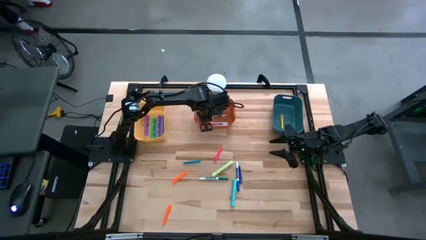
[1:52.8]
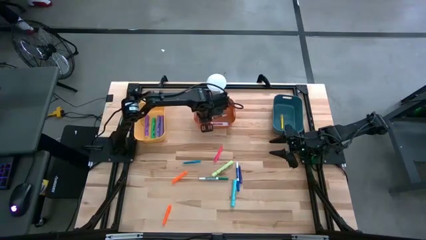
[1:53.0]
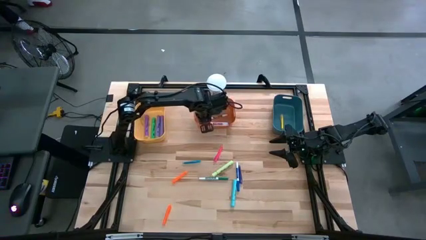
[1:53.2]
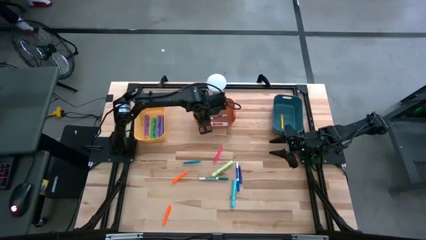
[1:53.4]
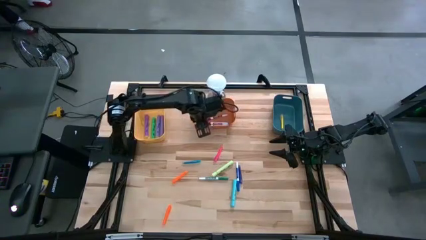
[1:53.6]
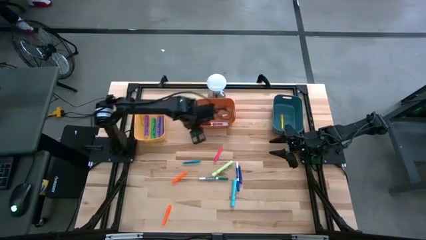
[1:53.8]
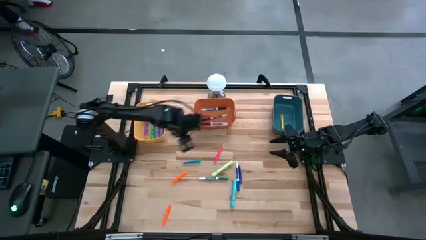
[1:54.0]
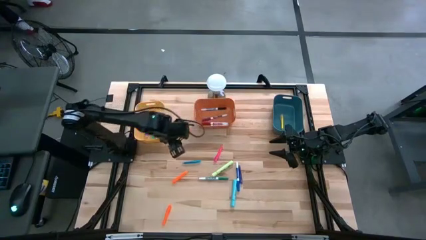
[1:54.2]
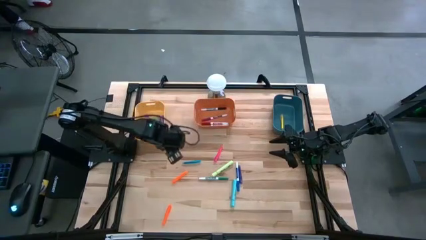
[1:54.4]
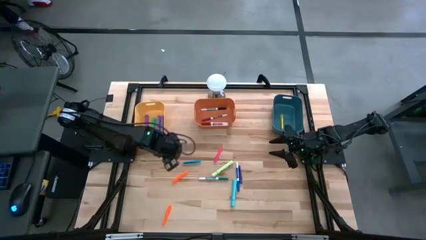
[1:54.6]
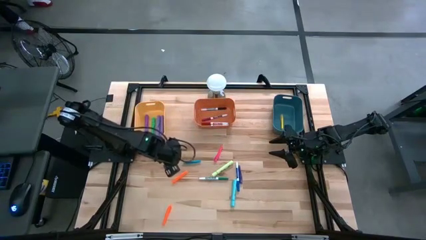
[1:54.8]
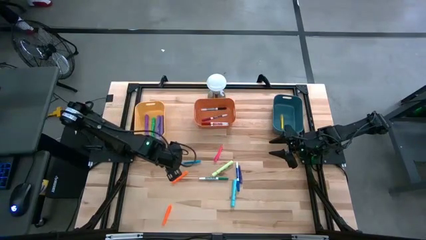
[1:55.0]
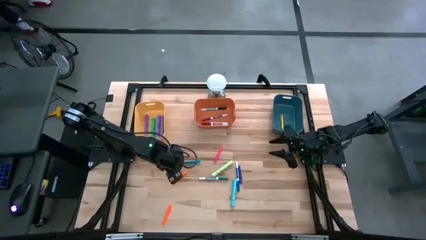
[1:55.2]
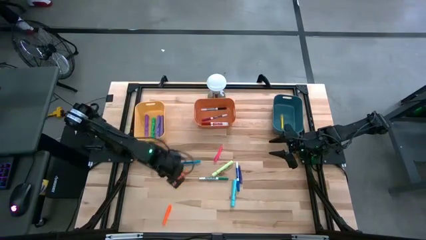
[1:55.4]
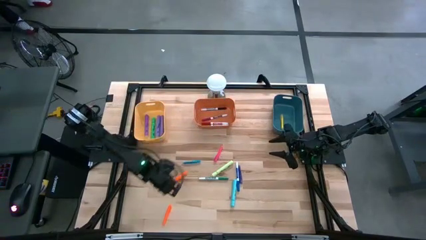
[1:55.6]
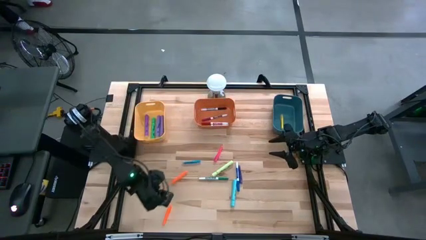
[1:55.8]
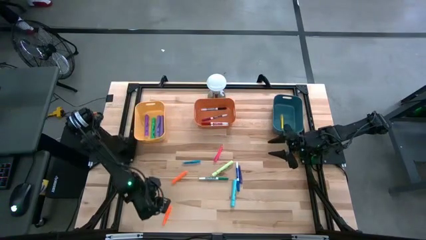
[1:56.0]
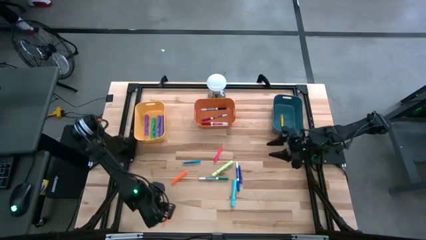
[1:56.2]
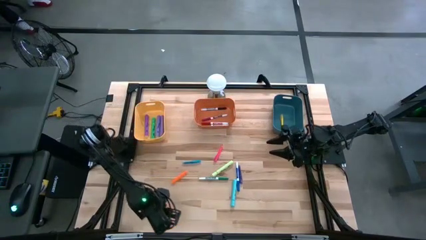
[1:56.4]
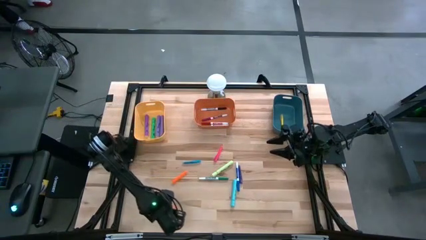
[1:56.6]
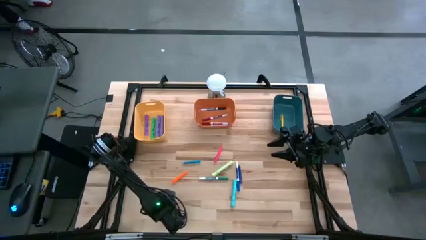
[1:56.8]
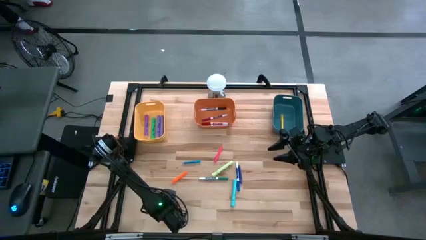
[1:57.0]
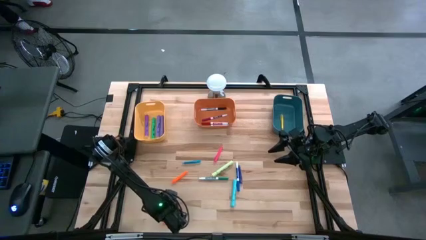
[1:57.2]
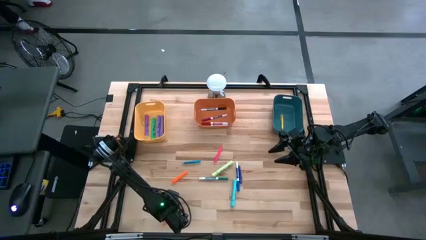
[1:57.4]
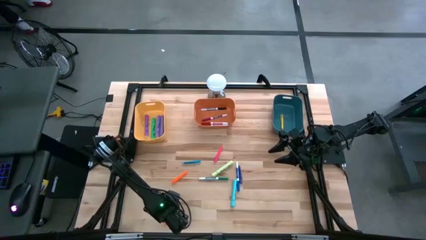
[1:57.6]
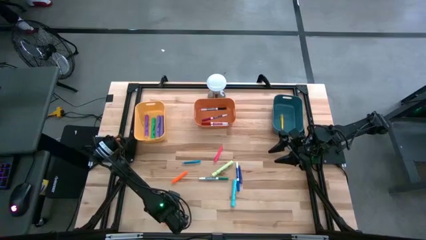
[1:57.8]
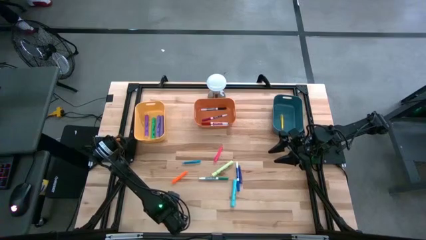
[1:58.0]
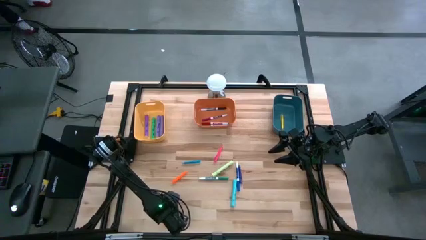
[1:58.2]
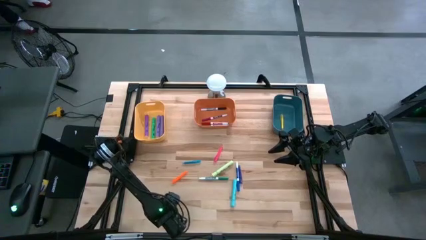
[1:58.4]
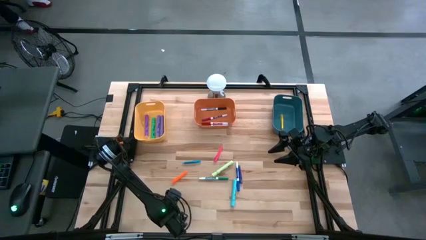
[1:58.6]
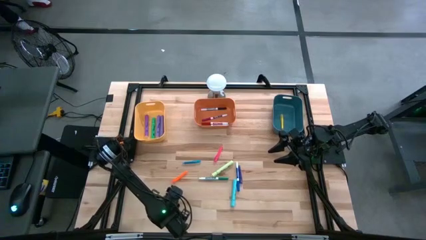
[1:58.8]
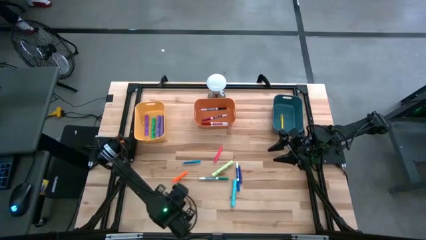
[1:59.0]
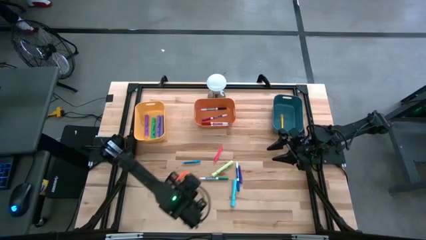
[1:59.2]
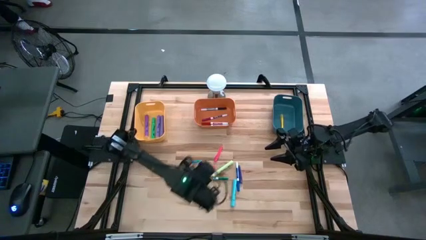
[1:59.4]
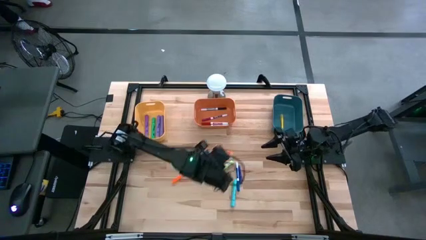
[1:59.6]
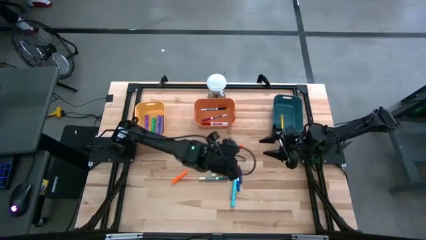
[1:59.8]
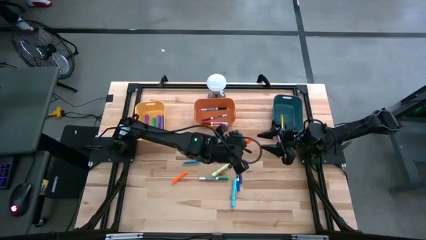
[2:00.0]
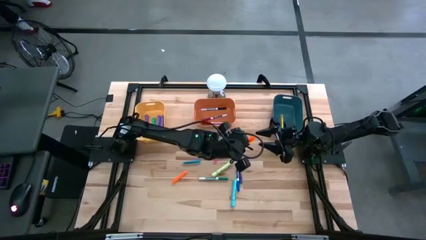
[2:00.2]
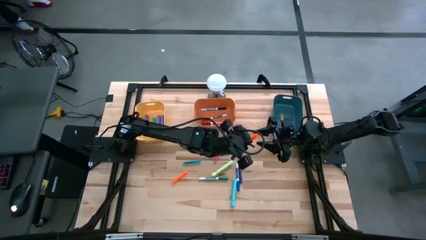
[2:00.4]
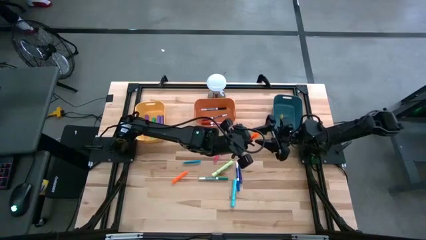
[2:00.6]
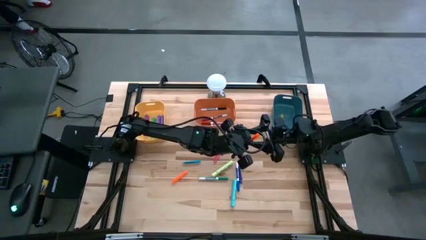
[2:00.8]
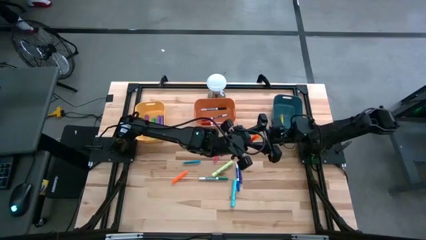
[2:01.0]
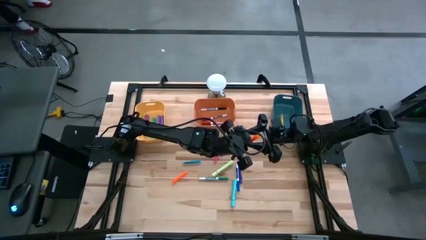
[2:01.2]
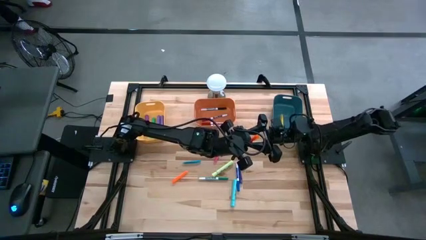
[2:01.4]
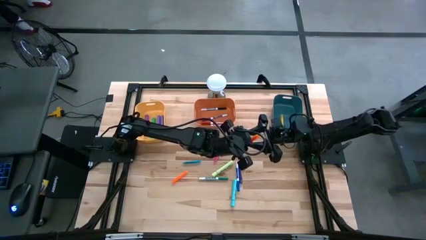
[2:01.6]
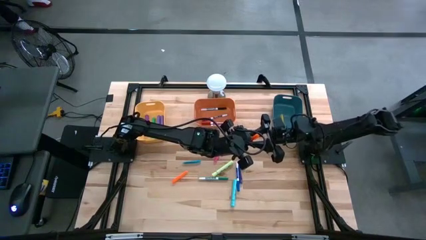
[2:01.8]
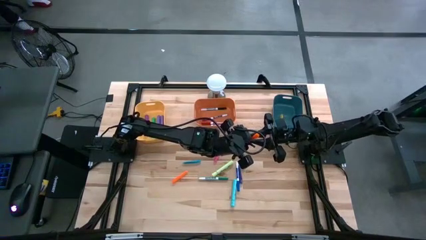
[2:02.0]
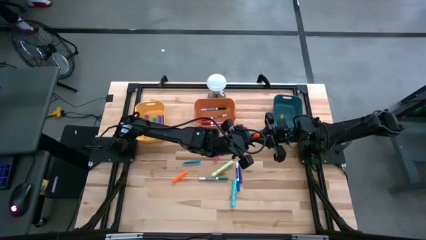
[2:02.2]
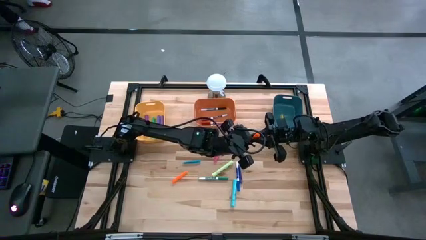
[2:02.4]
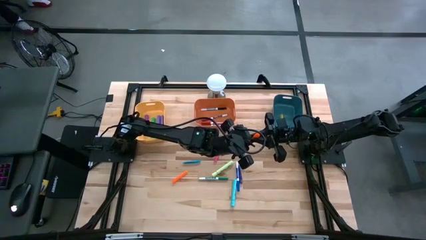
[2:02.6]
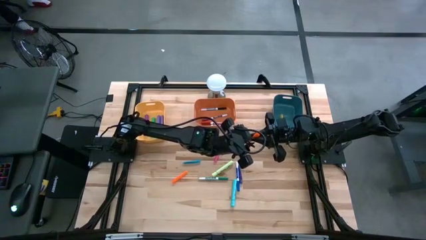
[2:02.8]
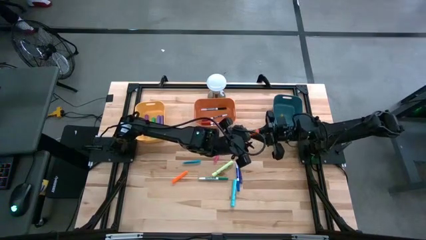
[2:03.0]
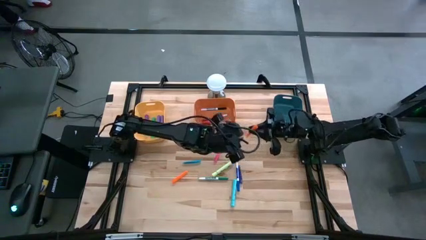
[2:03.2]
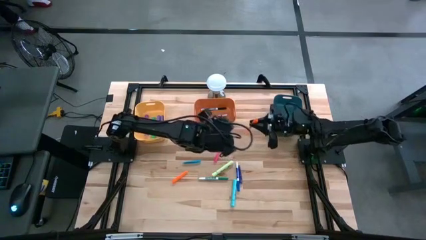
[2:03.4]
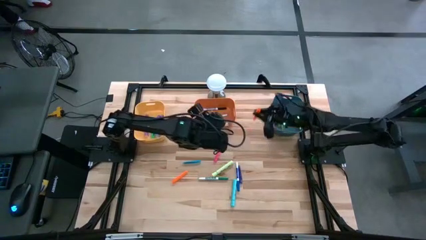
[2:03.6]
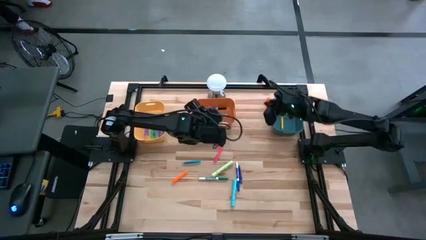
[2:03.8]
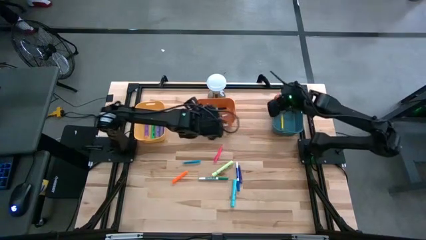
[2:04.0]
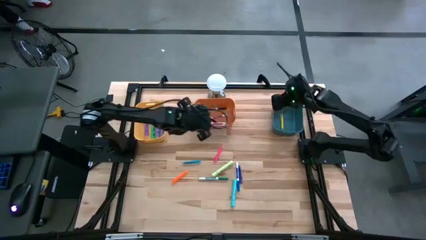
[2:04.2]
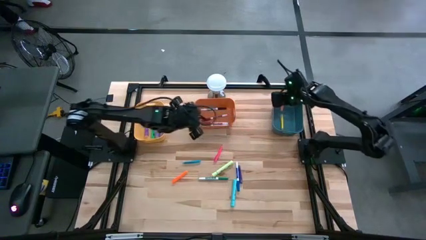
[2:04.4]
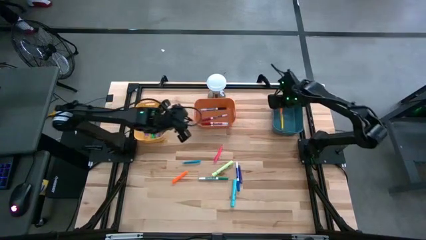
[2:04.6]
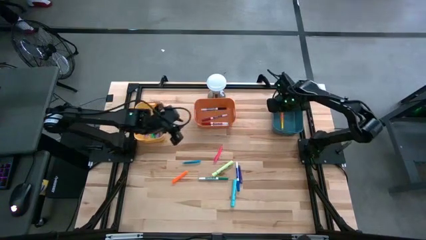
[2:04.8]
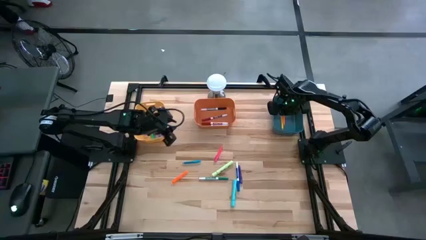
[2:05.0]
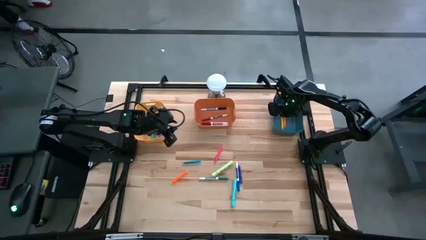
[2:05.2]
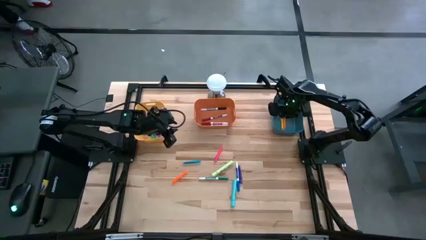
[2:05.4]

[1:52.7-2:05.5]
Task: Pick & Place Markers
Put the bottom orange pen into the blue bin
